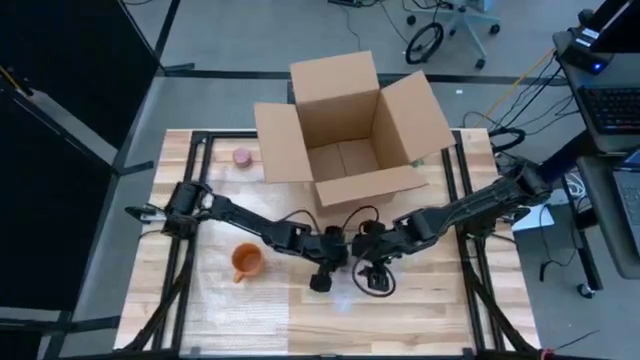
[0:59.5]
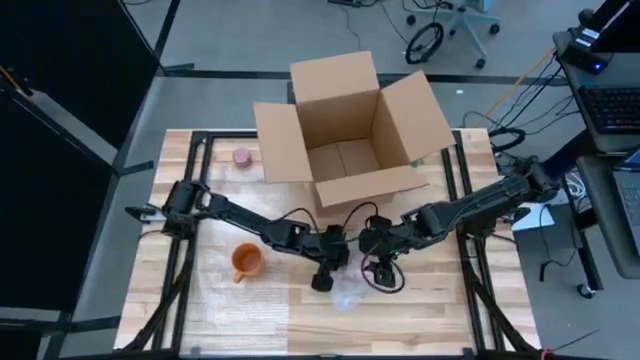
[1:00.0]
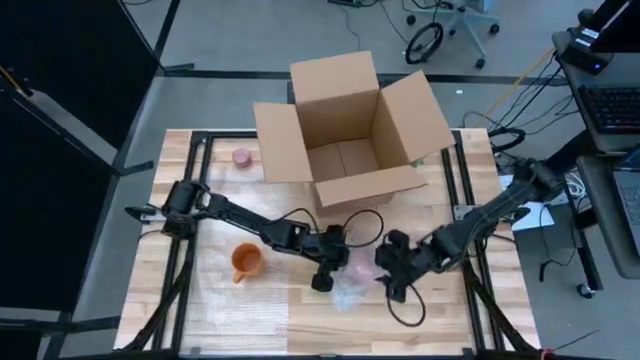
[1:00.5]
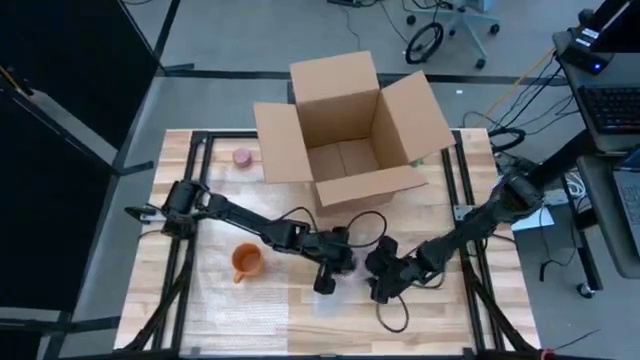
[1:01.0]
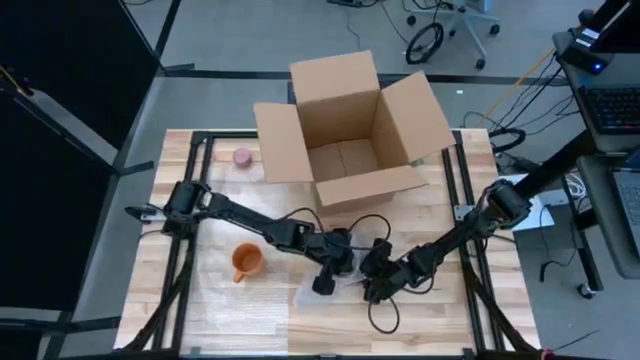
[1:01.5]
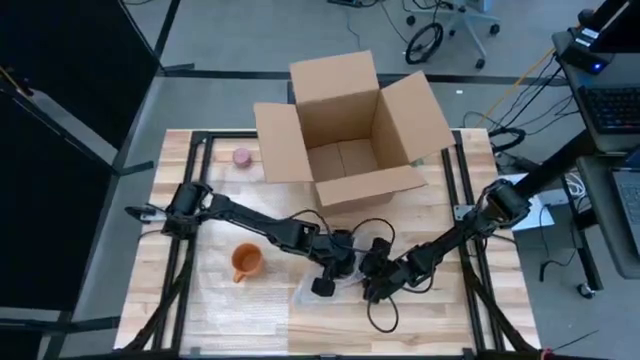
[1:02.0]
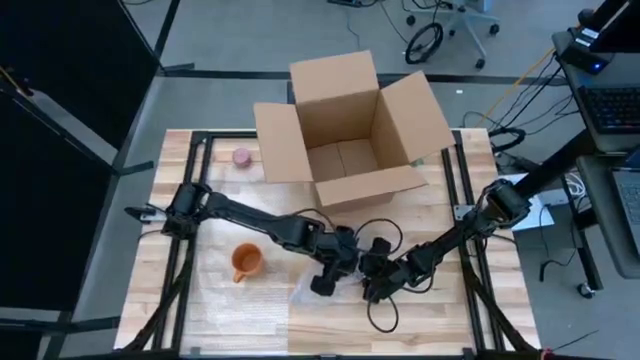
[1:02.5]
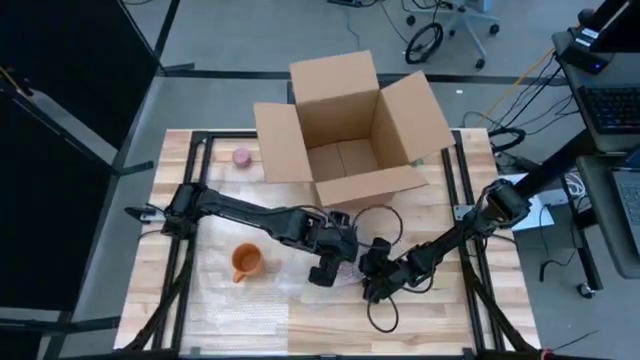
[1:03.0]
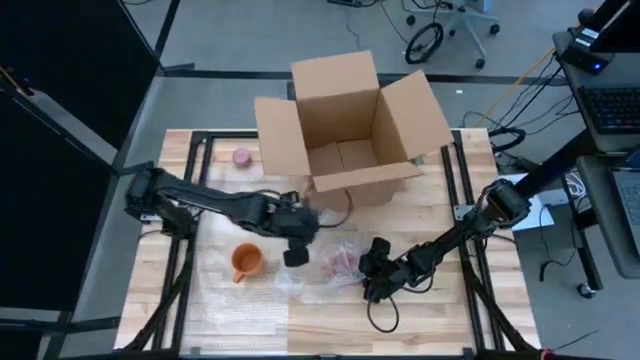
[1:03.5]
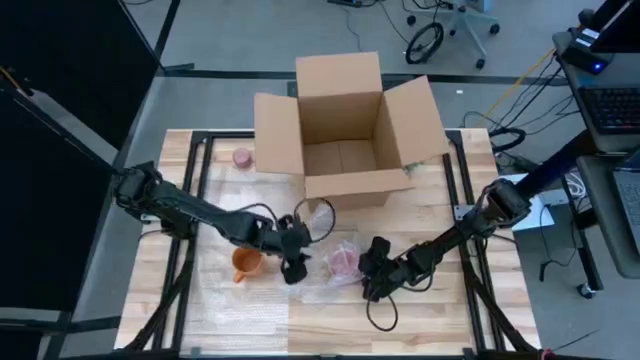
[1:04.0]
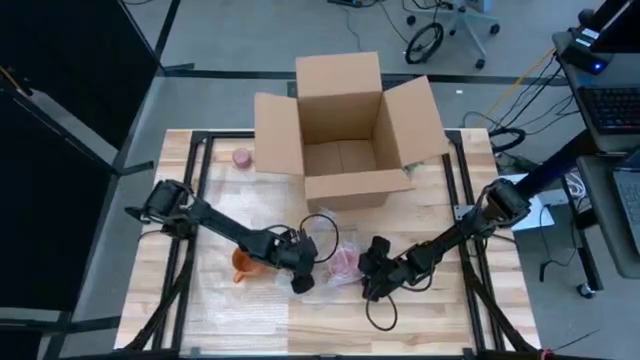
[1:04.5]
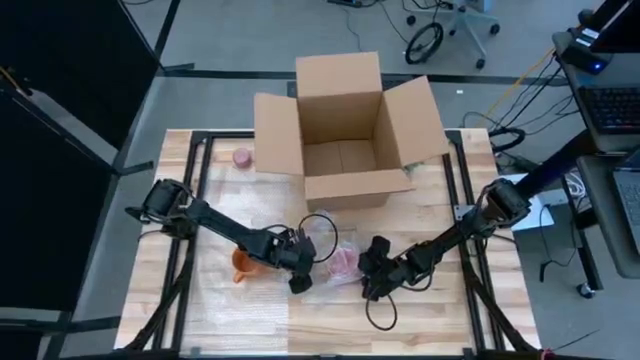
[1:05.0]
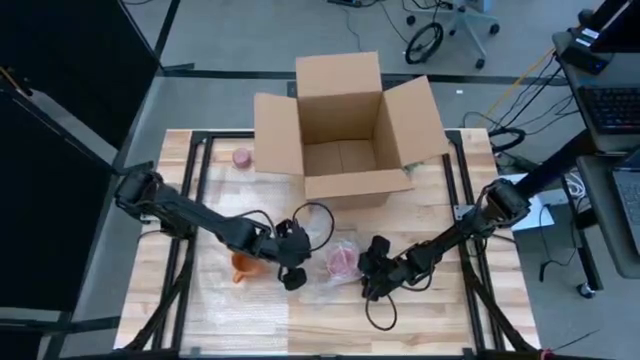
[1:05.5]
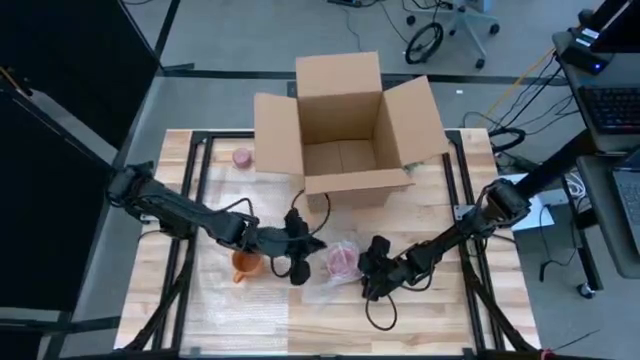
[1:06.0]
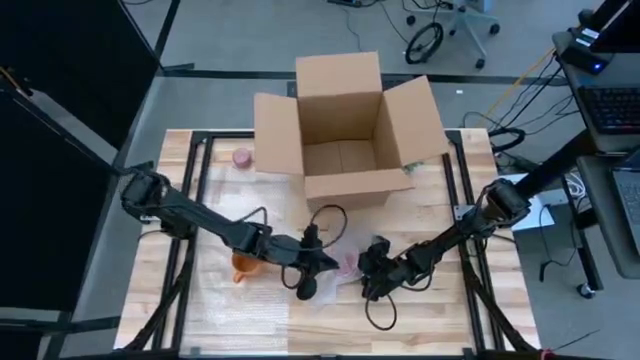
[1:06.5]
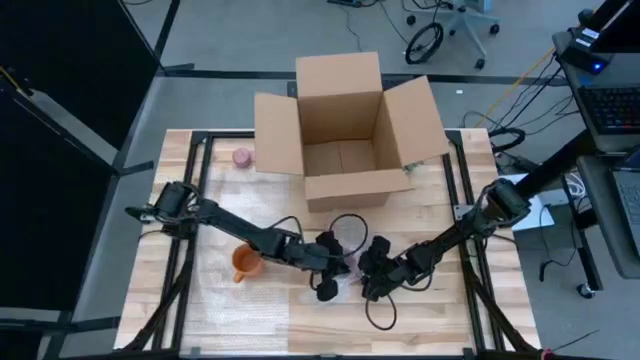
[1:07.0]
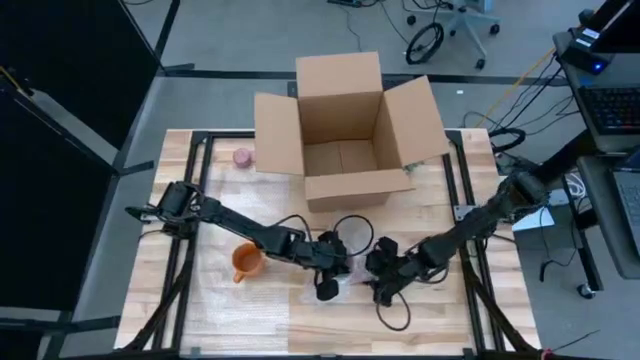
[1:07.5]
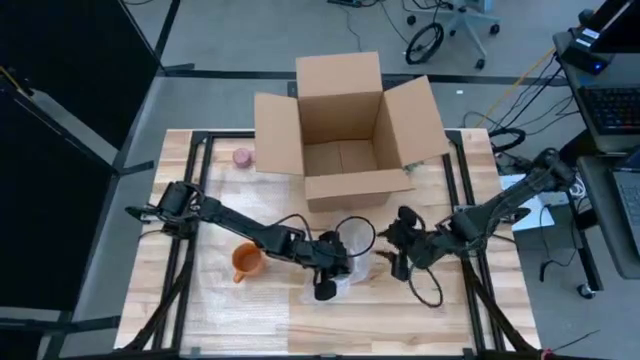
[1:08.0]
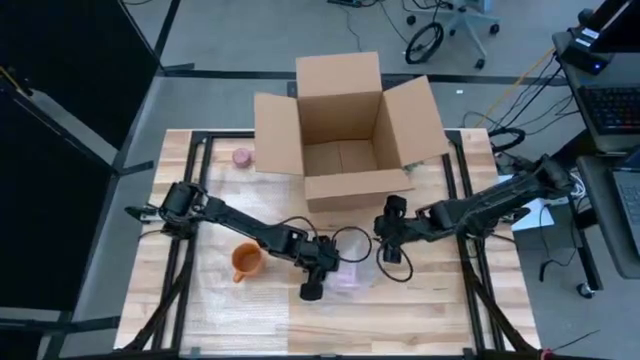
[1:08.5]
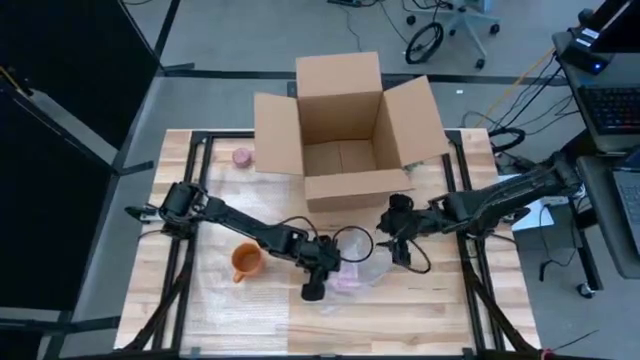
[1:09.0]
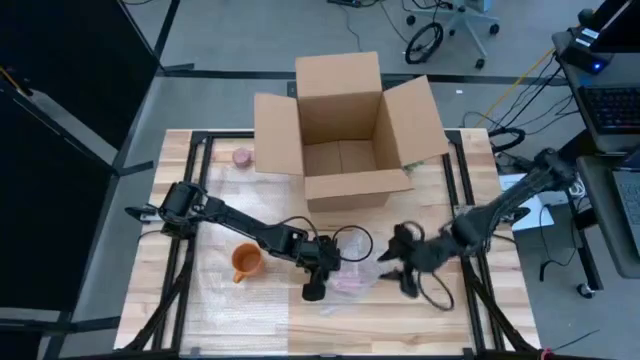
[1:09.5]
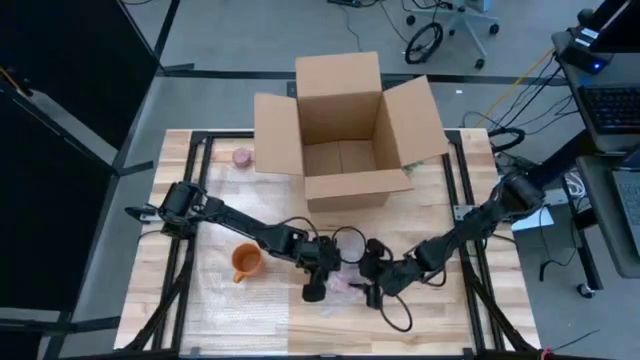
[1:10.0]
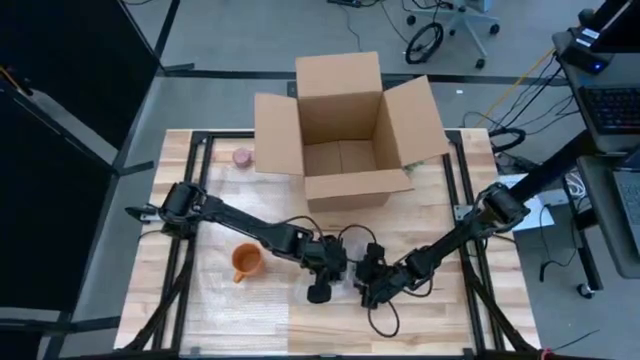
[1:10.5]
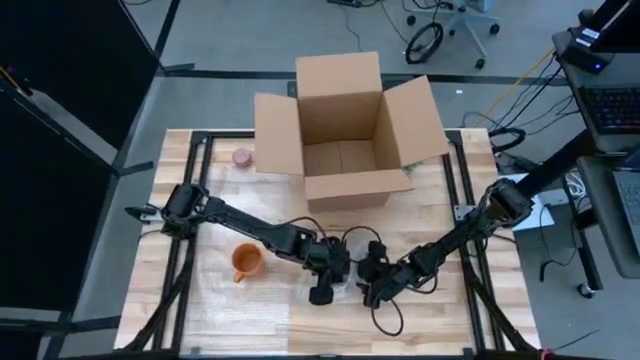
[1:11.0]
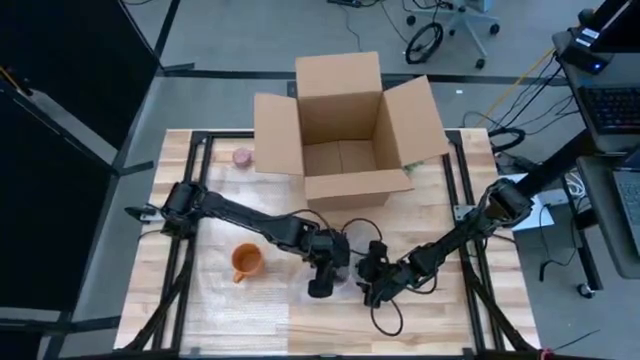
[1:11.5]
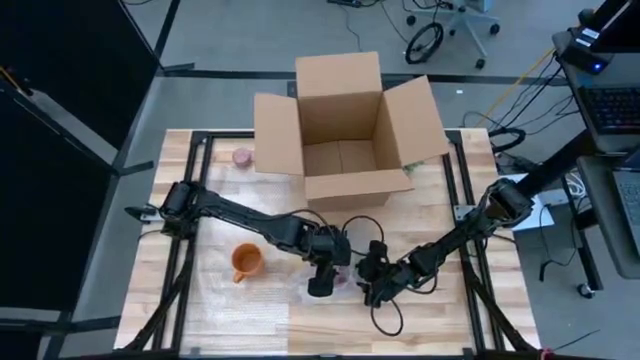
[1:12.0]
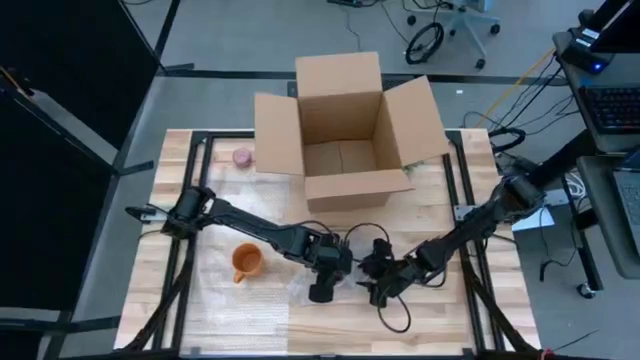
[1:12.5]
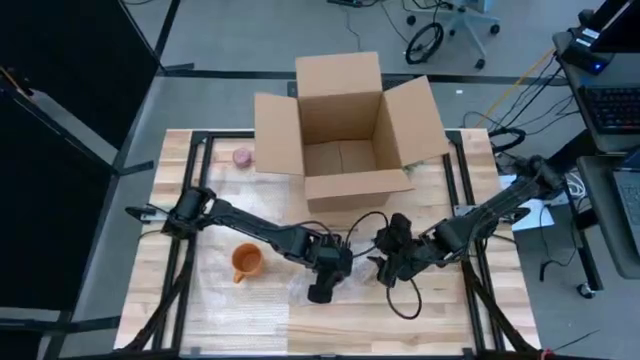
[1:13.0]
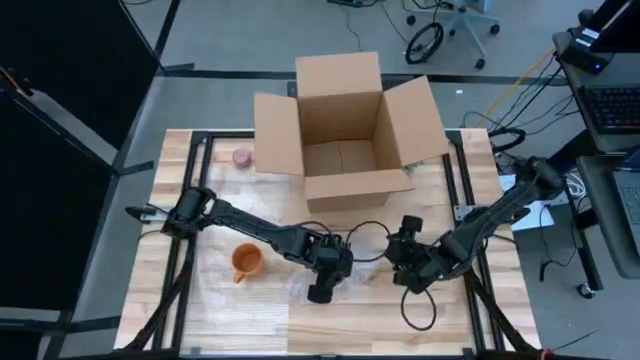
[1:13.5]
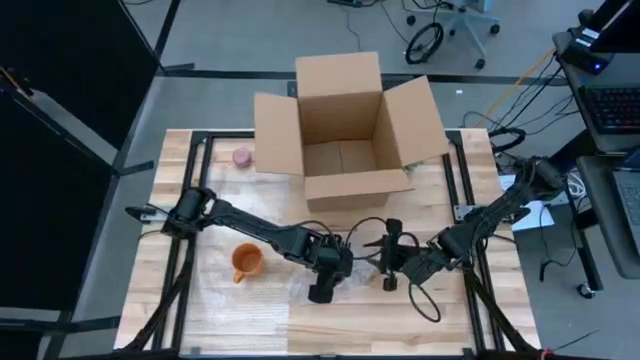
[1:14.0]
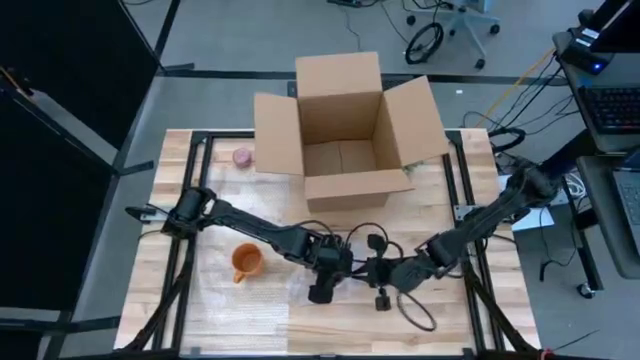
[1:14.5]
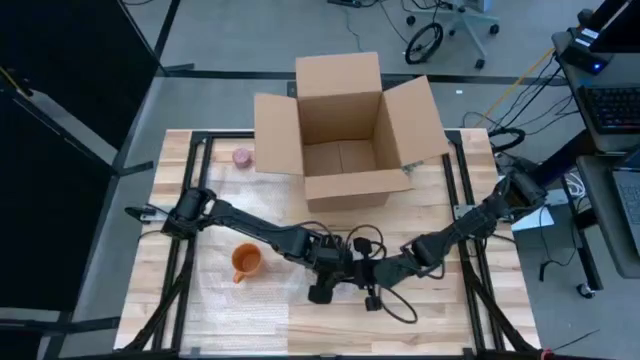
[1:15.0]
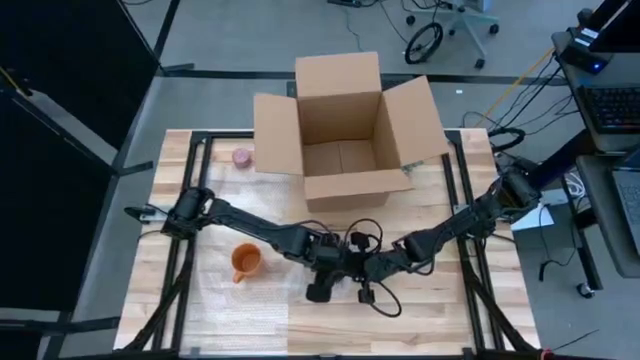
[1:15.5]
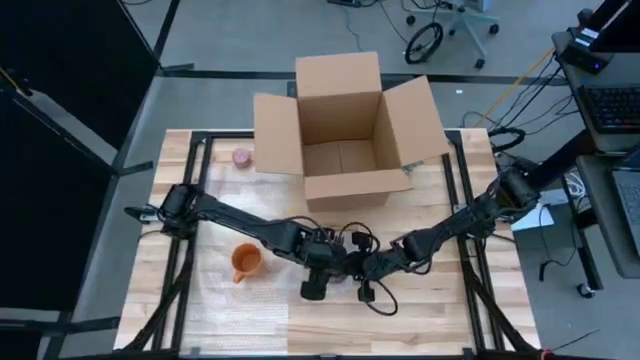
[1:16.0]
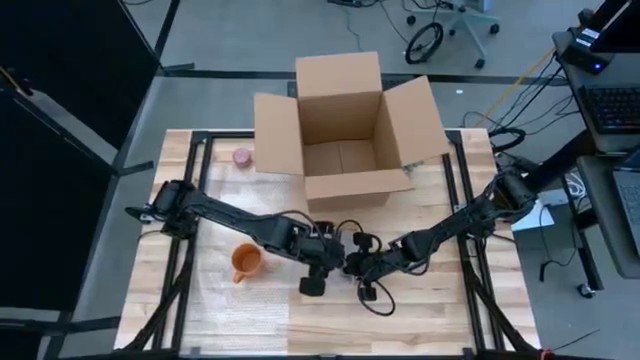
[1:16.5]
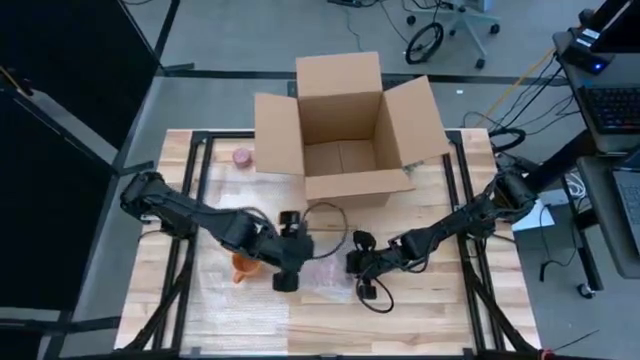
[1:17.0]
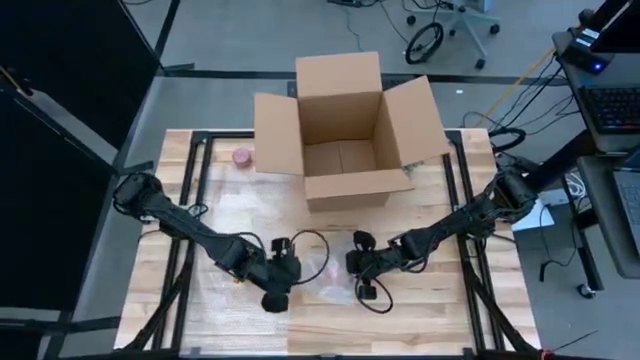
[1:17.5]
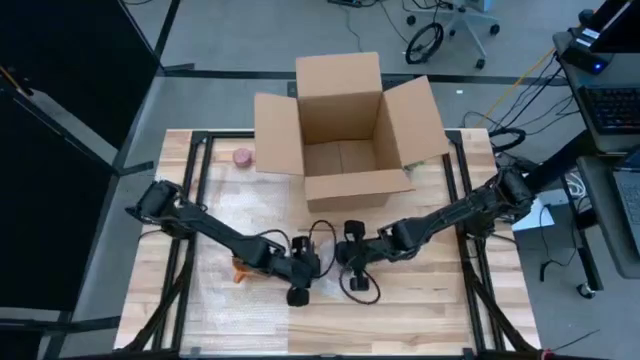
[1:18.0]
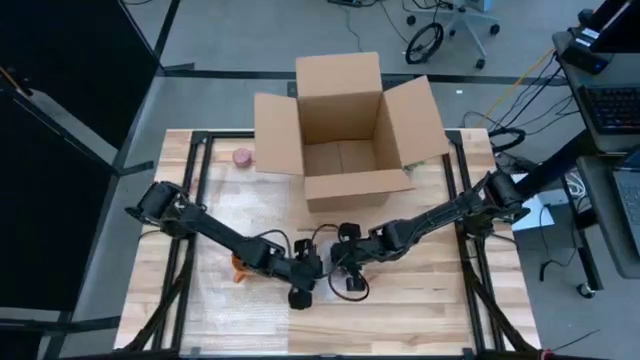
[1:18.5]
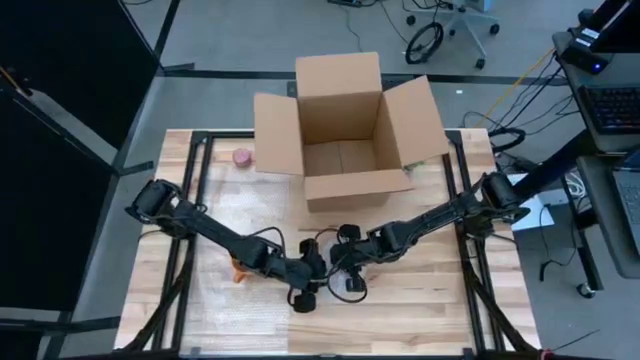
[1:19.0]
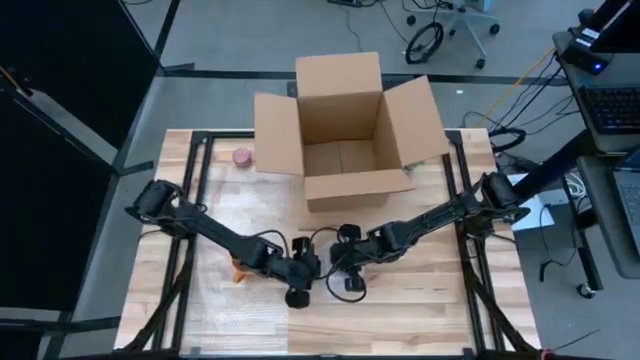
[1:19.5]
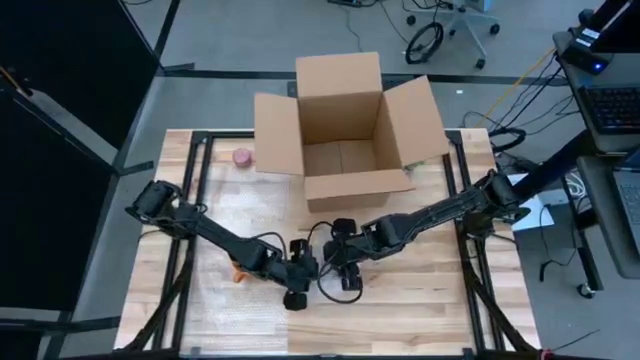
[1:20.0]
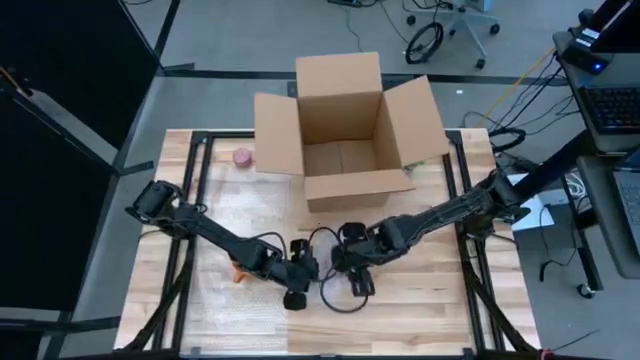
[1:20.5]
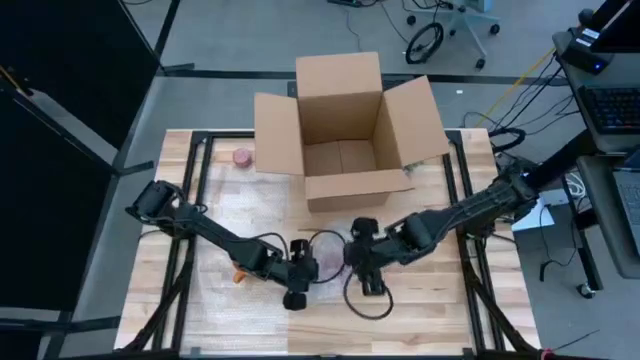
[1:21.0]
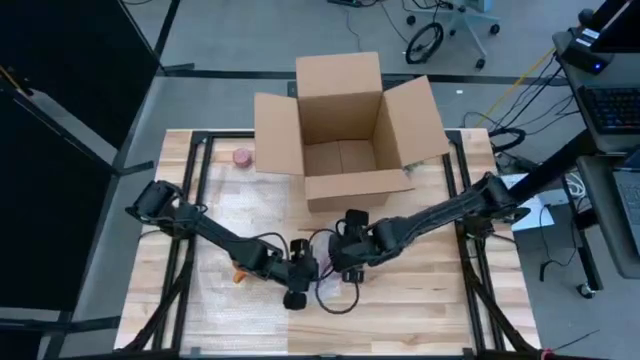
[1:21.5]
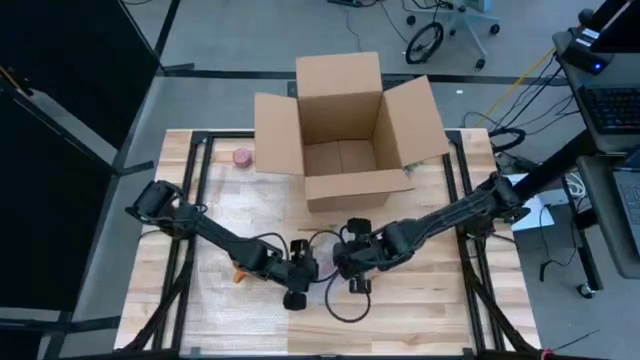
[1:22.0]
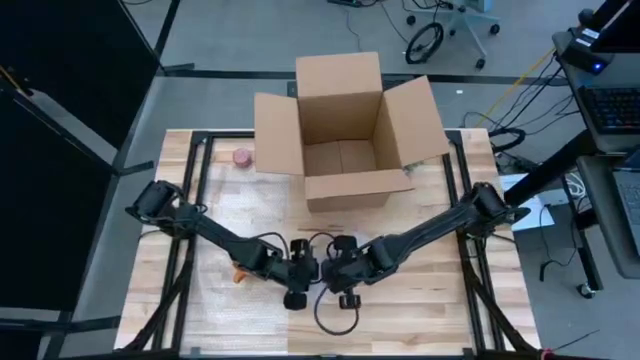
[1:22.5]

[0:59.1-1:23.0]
Task: wrap mug
Wrap the pink cup with the bubble wrap
